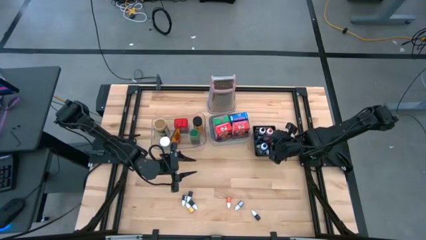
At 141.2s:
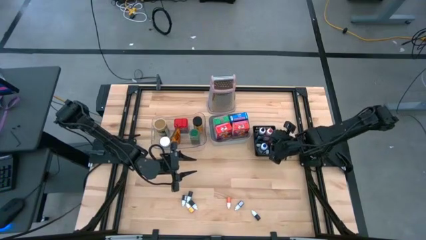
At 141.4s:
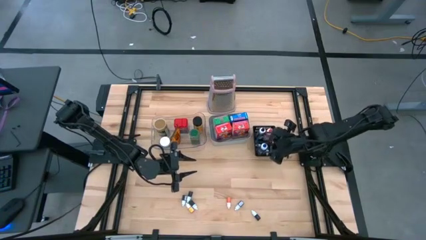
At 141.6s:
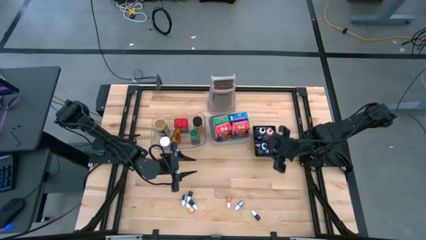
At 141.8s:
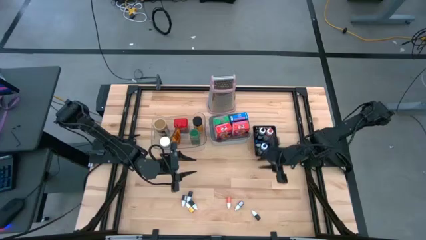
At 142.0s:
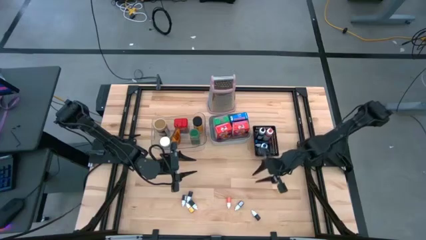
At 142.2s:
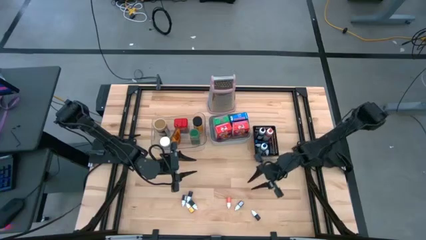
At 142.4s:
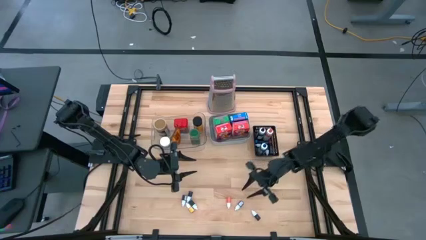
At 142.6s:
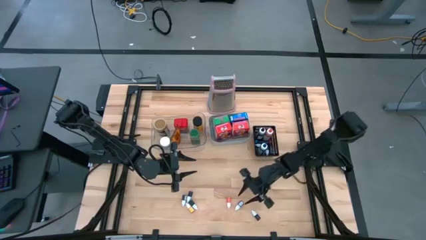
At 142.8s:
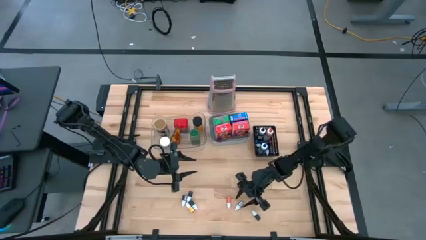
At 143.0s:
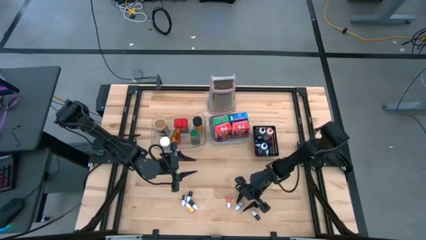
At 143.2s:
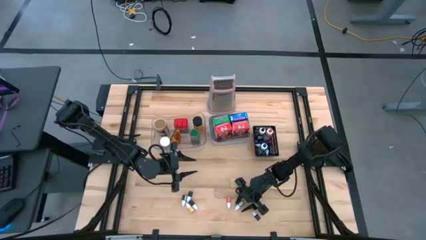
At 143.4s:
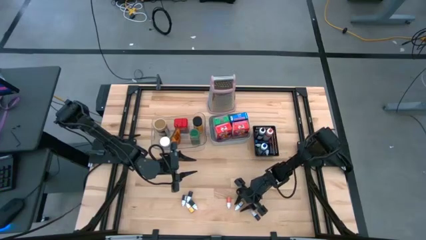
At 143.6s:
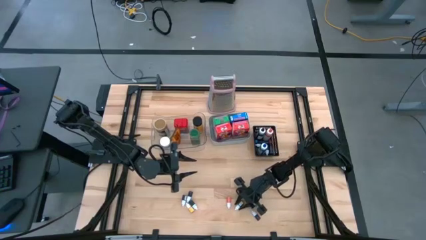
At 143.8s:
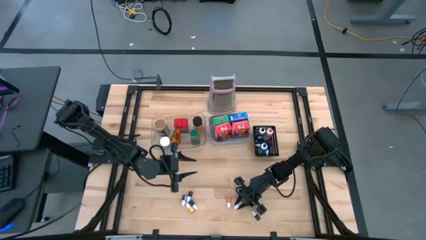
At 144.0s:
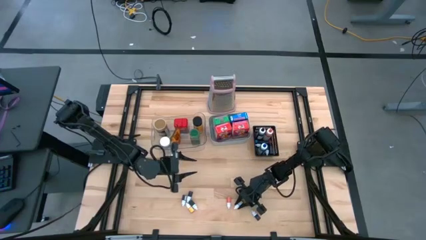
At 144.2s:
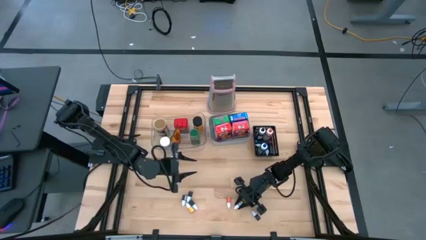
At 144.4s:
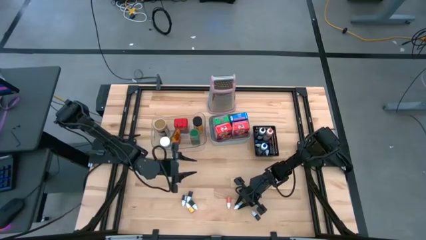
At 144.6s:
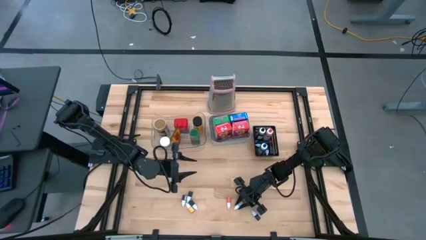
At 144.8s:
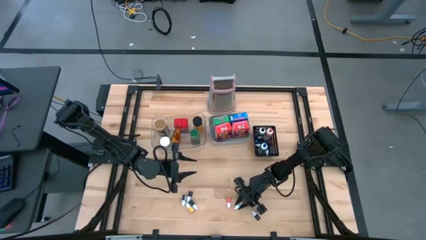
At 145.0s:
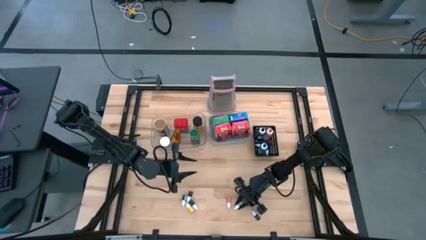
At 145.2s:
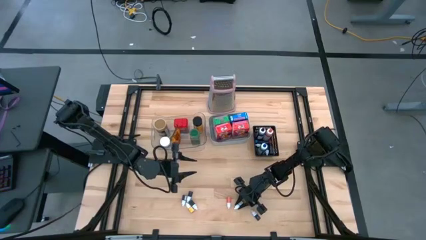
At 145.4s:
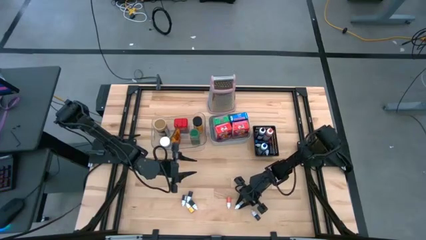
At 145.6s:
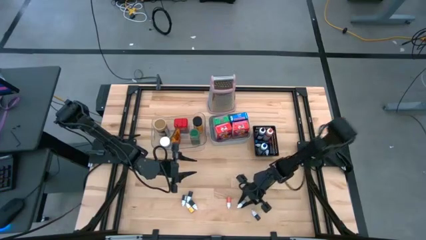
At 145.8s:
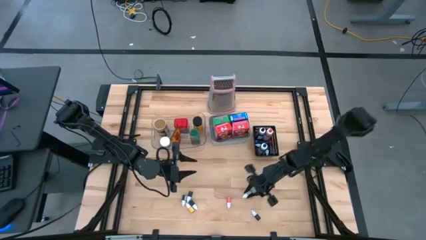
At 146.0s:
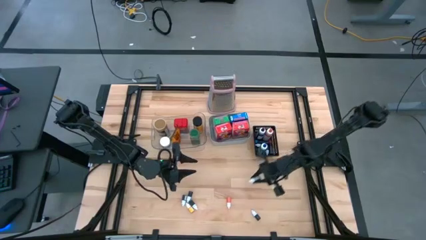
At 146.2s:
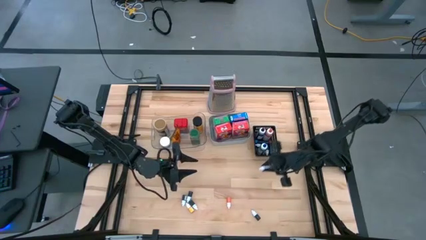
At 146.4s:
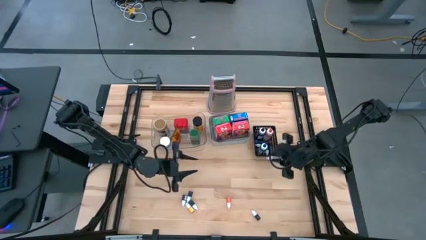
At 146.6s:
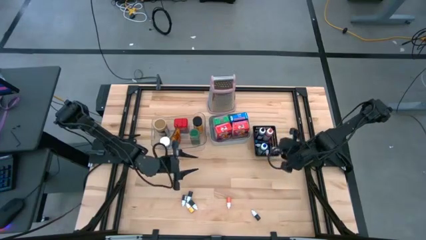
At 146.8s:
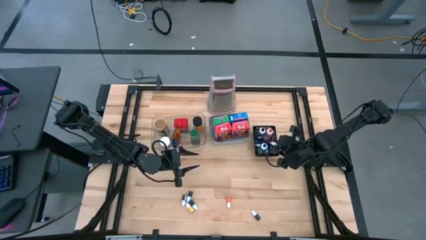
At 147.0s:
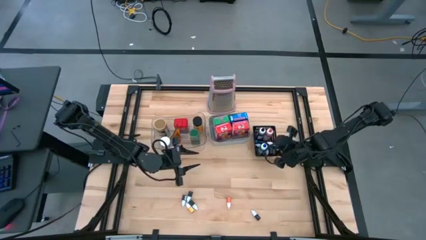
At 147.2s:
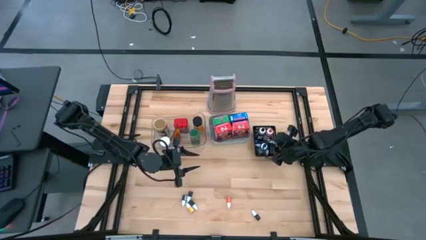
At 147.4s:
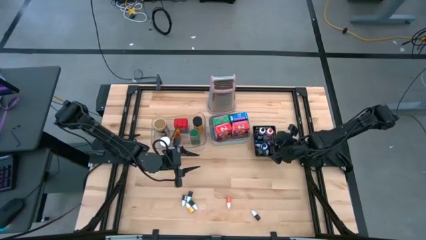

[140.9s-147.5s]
Task: Pick & Place Kitchen Items
Put the small black food coloring bottle into the black basket

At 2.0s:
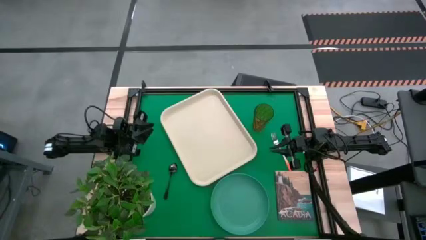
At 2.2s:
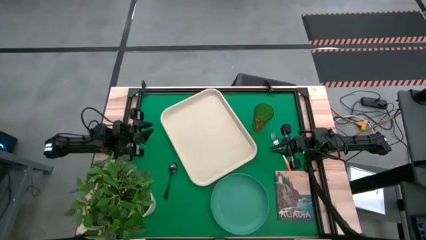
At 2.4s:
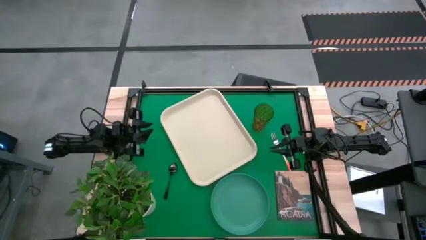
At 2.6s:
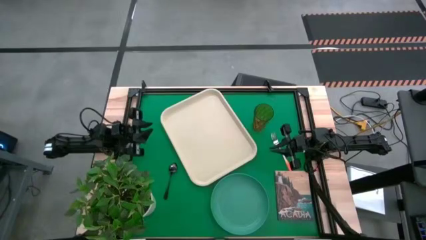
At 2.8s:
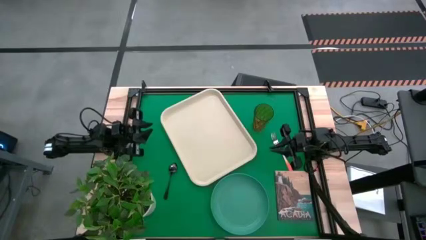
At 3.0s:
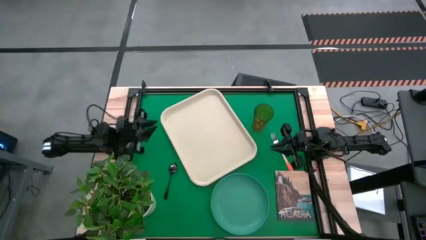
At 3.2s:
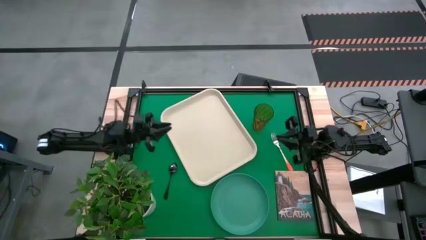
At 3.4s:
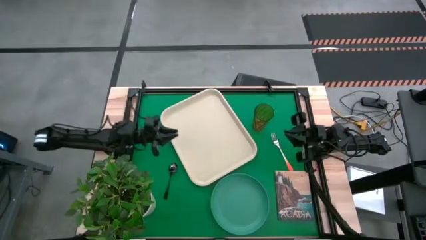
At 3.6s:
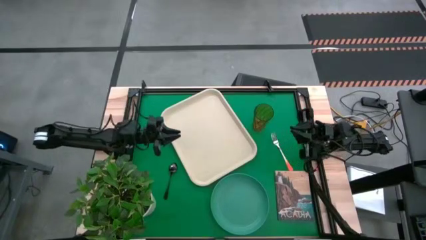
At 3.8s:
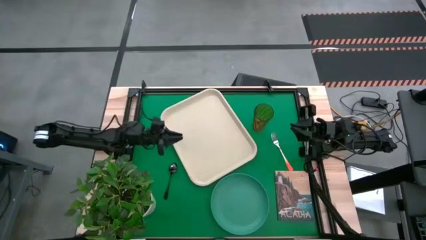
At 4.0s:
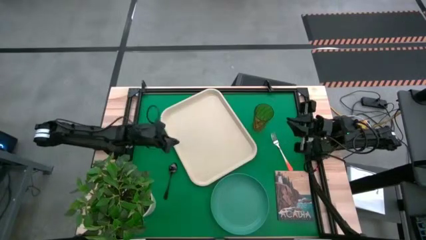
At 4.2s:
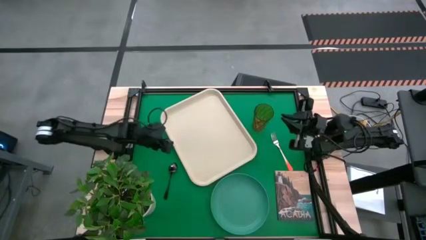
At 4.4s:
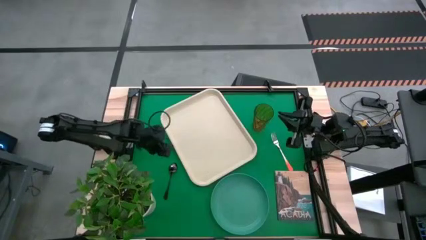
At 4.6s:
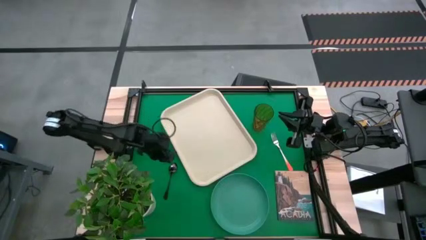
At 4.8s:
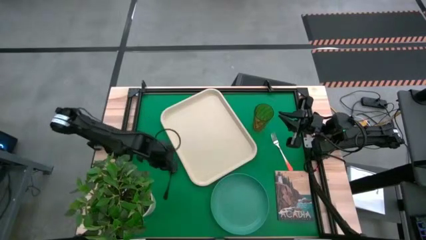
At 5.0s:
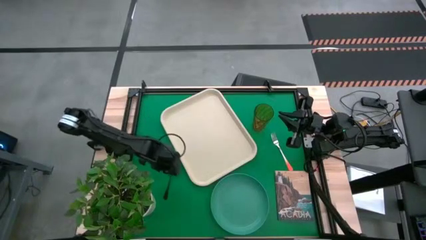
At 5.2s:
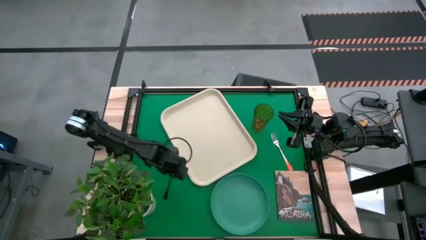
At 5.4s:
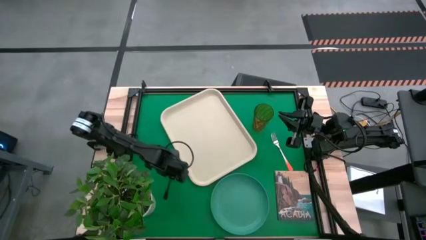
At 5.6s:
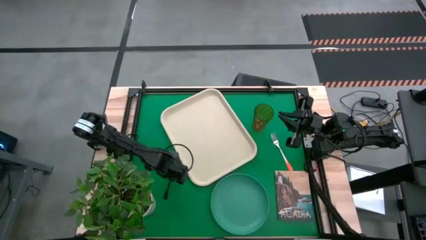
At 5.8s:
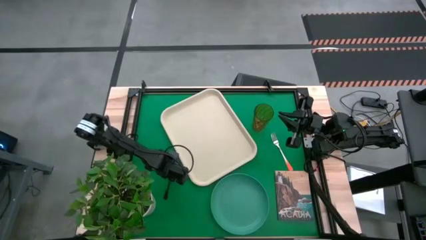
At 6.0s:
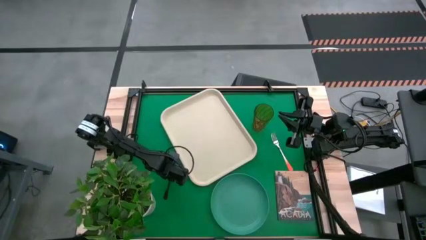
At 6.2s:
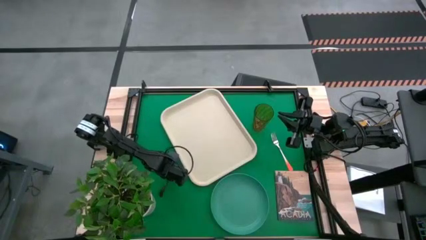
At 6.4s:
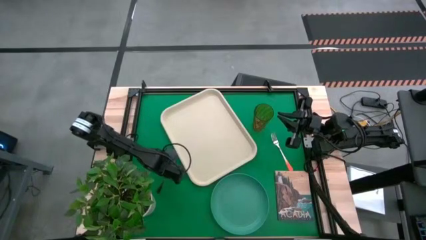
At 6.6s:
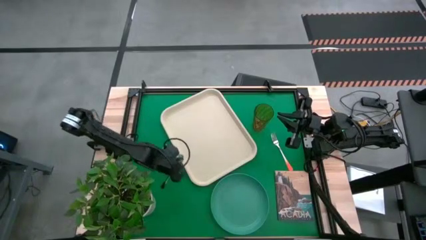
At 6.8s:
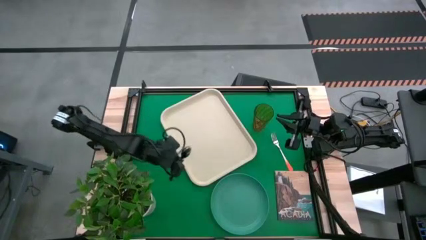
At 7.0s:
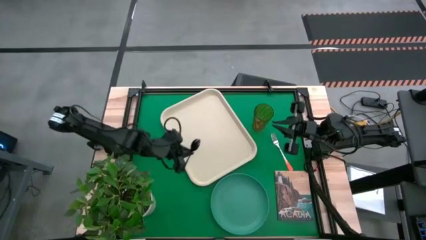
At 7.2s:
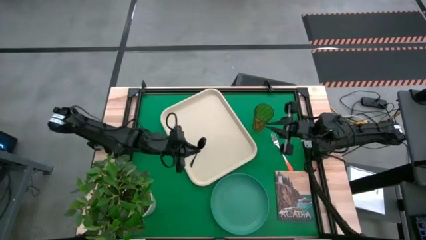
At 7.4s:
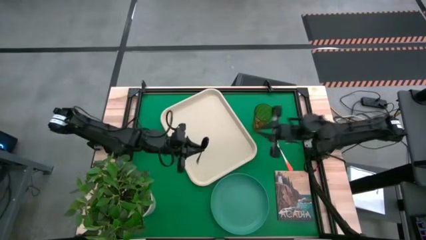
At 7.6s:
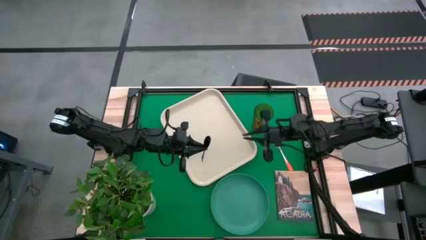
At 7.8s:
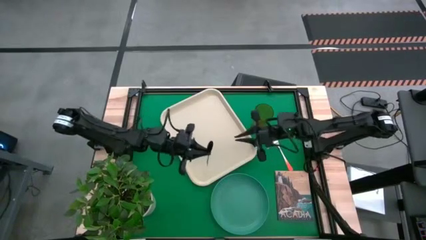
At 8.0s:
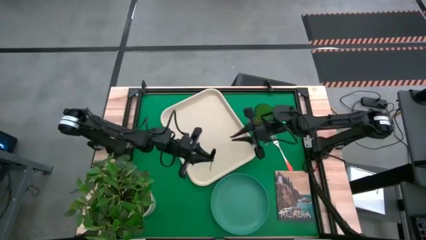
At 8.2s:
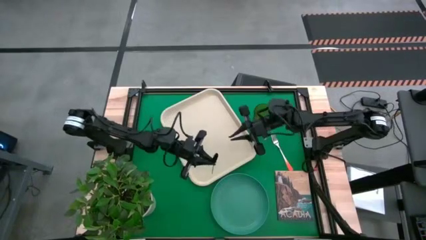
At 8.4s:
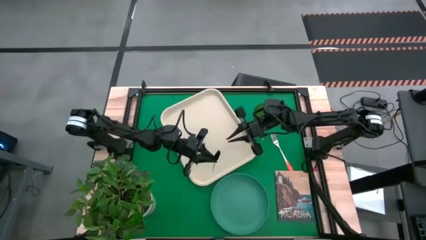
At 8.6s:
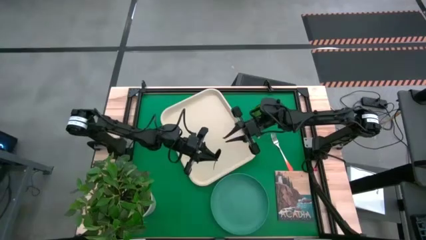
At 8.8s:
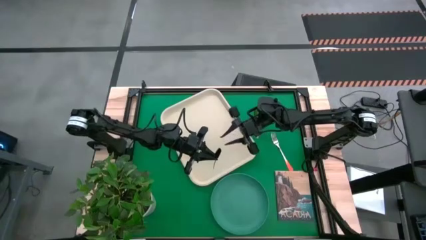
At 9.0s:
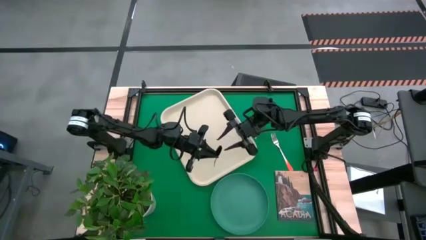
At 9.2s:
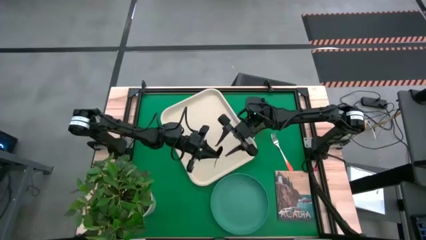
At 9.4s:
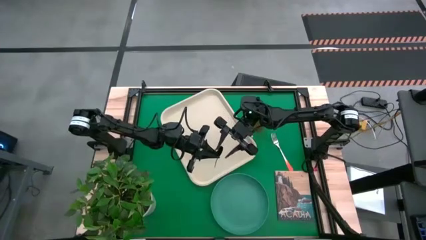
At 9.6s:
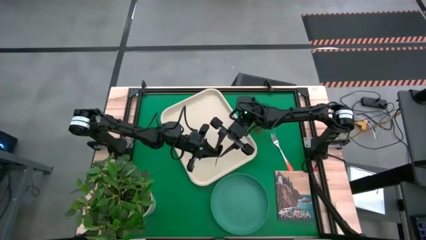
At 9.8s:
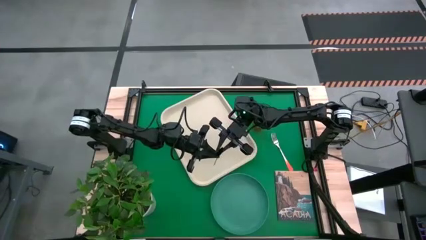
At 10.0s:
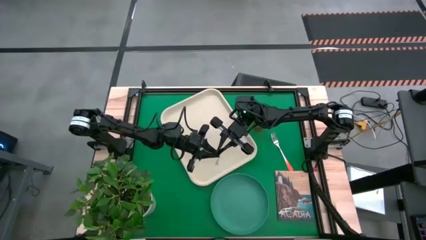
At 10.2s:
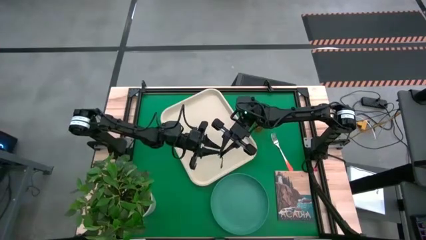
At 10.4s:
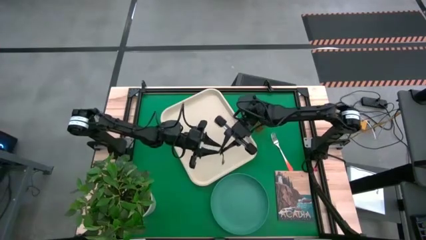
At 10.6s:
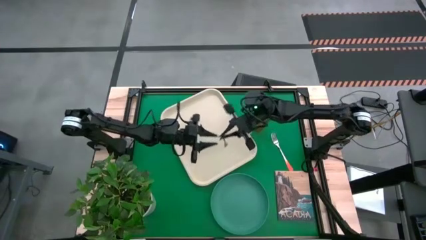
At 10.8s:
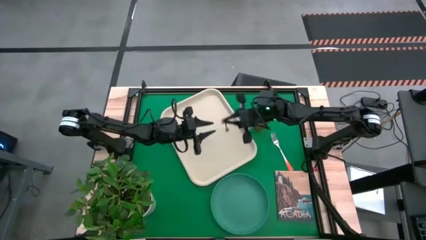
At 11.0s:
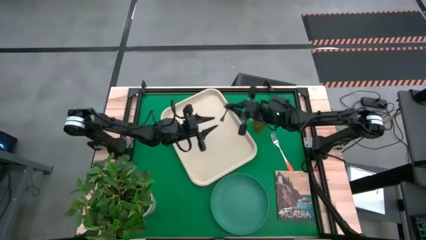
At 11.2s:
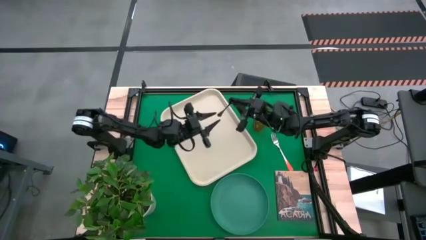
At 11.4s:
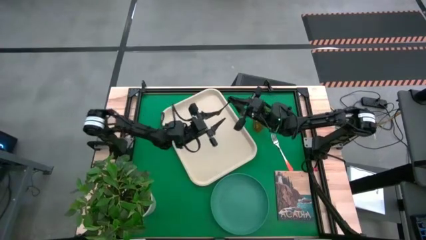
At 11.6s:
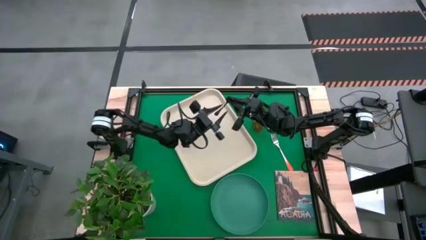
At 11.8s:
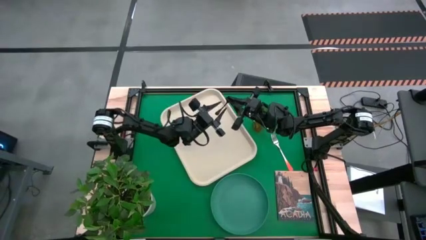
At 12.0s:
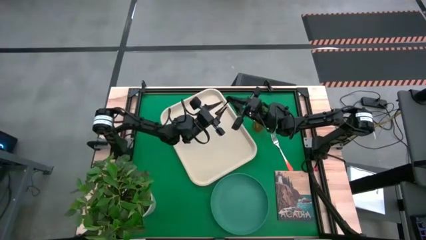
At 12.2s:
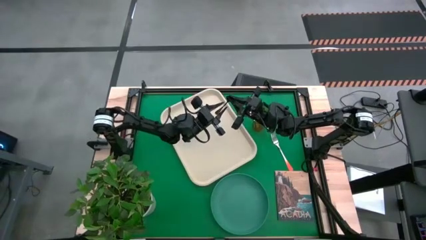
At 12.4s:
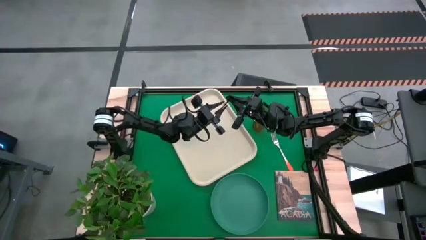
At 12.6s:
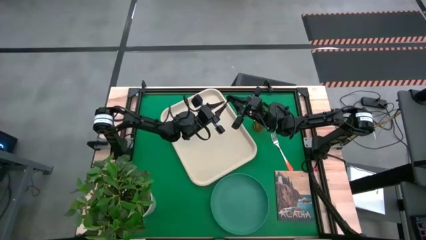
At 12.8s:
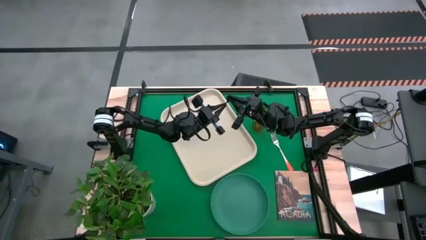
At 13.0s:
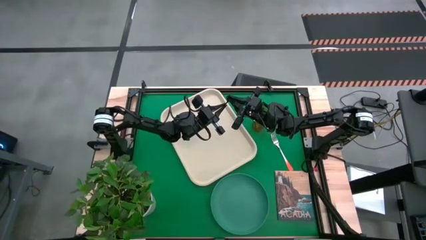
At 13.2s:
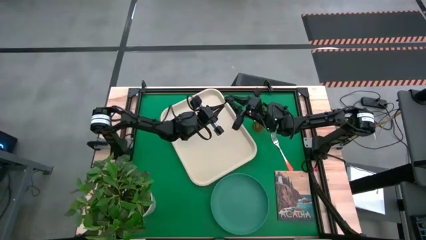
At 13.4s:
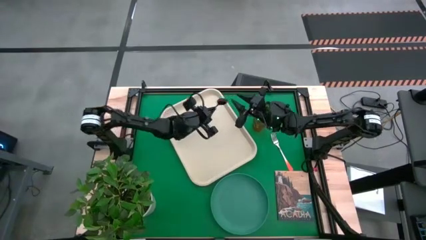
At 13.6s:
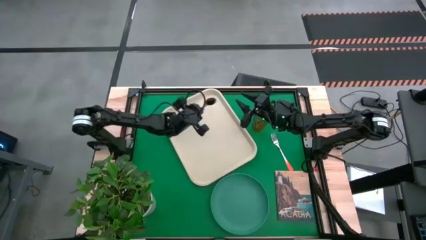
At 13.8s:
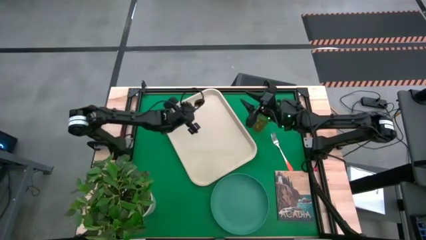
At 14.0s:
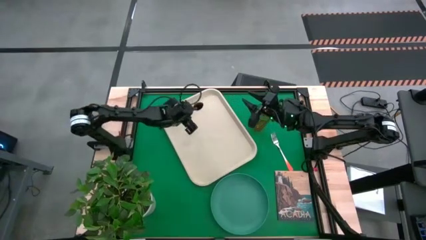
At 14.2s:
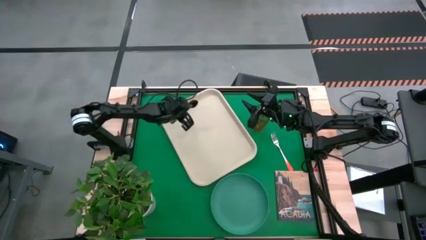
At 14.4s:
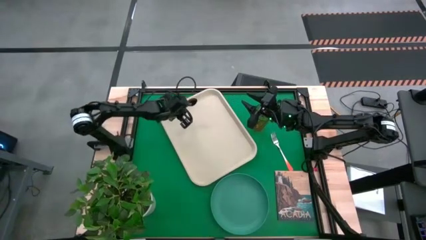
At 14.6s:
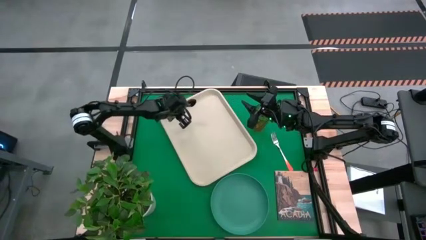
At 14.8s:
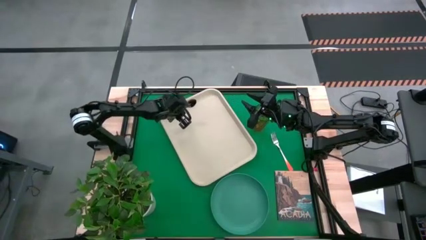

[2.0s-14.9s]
Task: Pick and place plate/cup/fork/spoon on tray
Put the black spoon on the top left of the white tray
